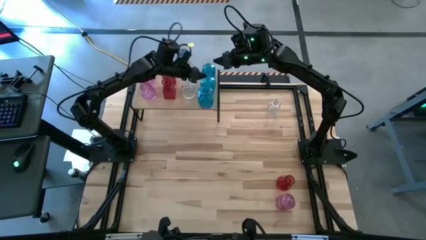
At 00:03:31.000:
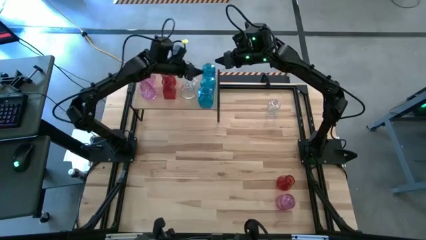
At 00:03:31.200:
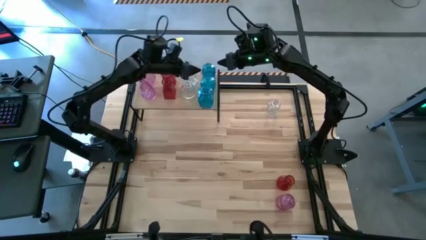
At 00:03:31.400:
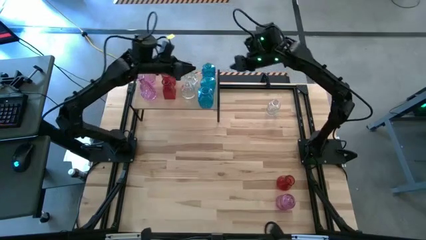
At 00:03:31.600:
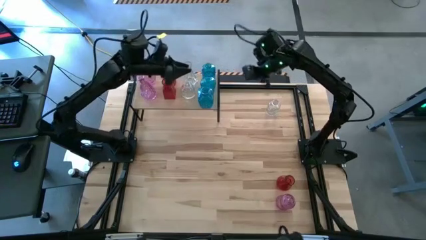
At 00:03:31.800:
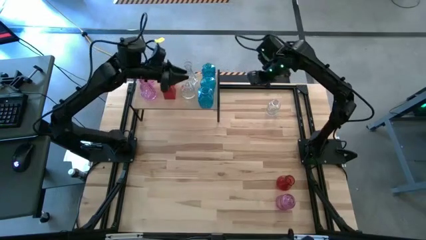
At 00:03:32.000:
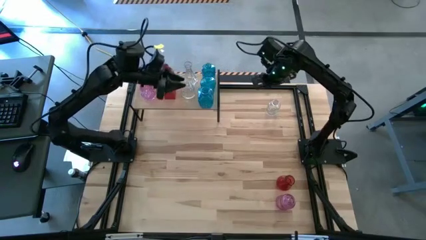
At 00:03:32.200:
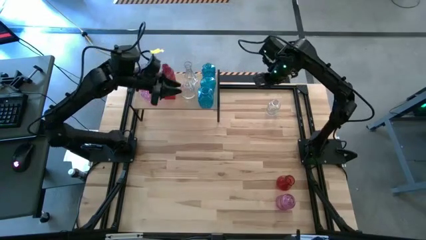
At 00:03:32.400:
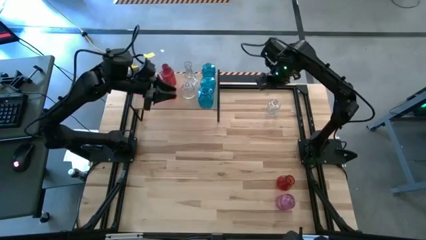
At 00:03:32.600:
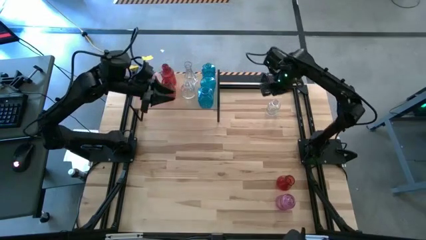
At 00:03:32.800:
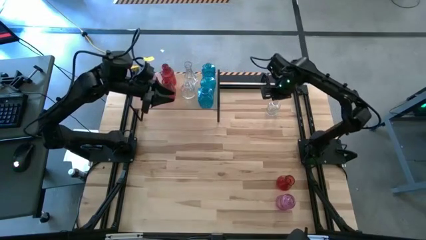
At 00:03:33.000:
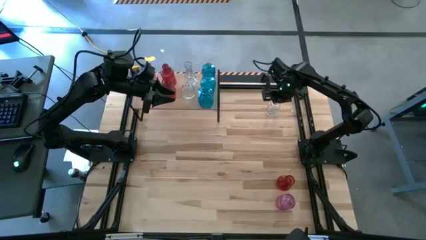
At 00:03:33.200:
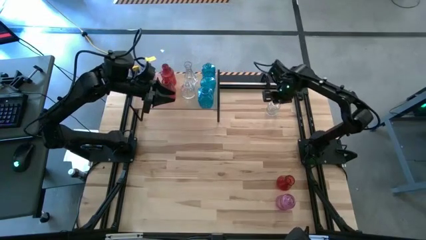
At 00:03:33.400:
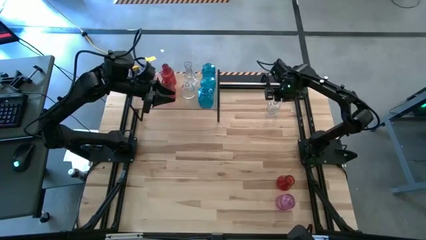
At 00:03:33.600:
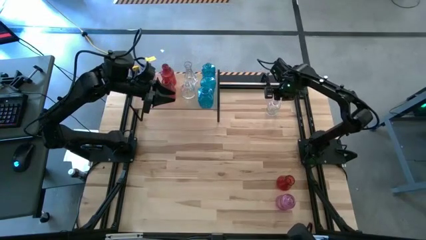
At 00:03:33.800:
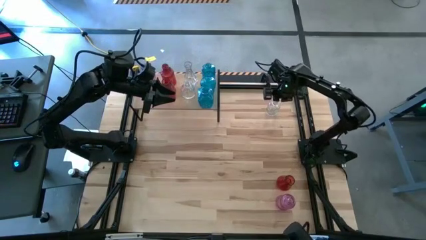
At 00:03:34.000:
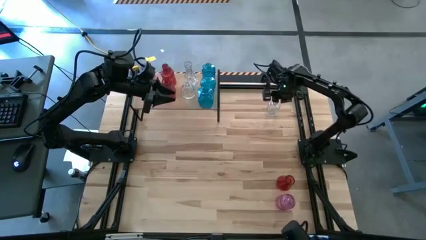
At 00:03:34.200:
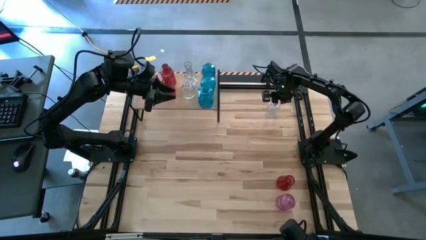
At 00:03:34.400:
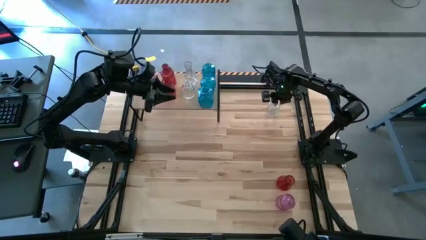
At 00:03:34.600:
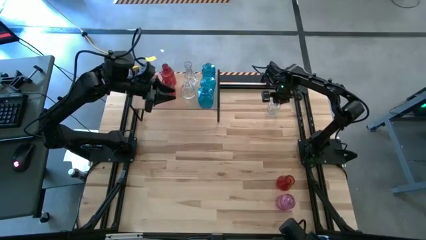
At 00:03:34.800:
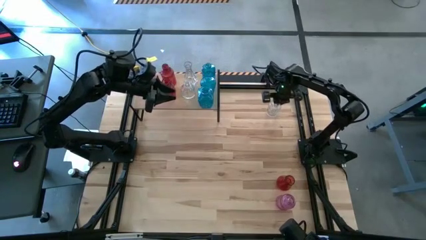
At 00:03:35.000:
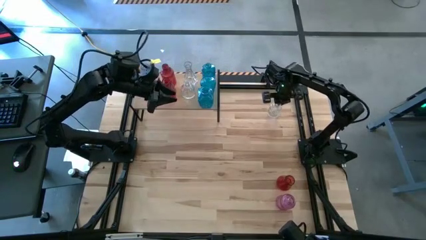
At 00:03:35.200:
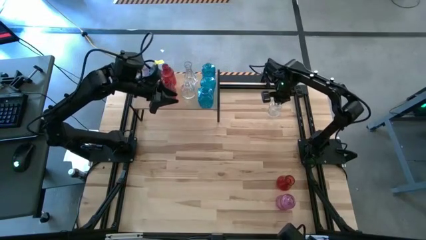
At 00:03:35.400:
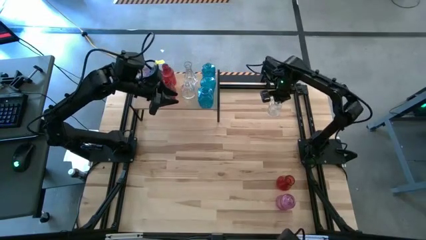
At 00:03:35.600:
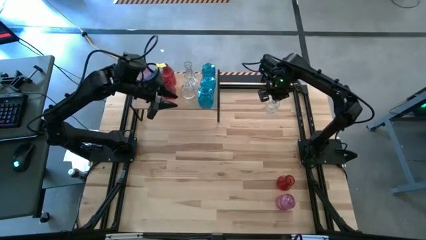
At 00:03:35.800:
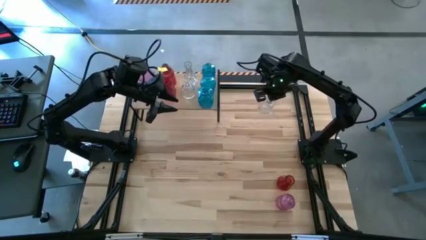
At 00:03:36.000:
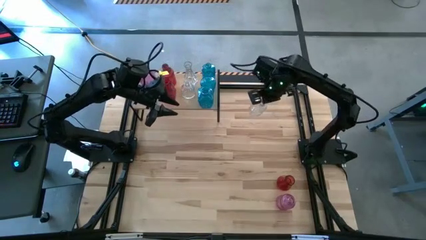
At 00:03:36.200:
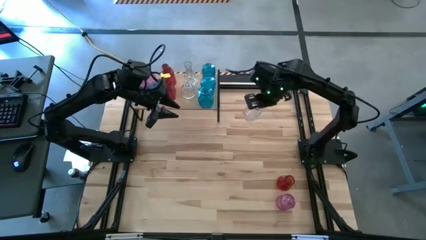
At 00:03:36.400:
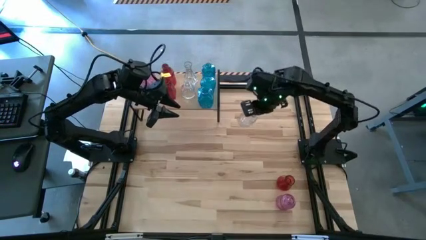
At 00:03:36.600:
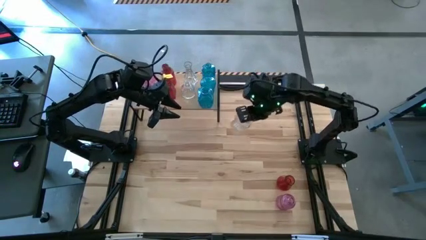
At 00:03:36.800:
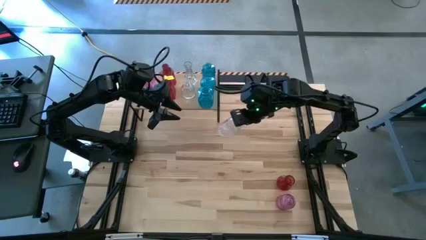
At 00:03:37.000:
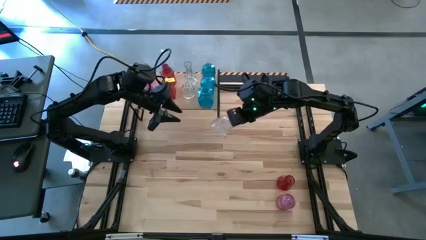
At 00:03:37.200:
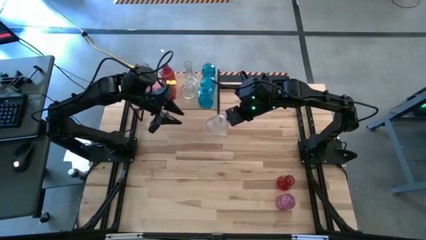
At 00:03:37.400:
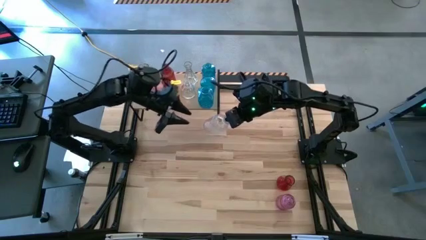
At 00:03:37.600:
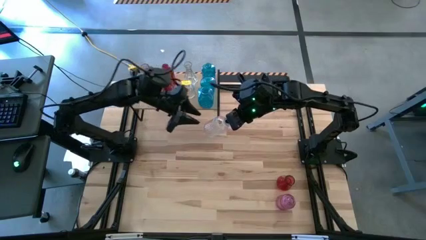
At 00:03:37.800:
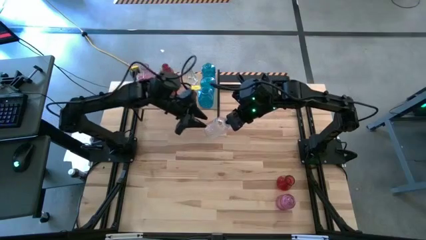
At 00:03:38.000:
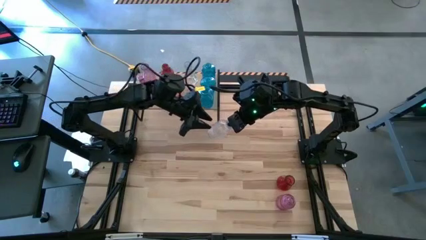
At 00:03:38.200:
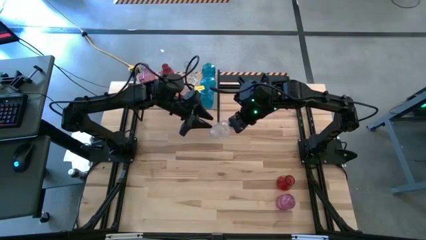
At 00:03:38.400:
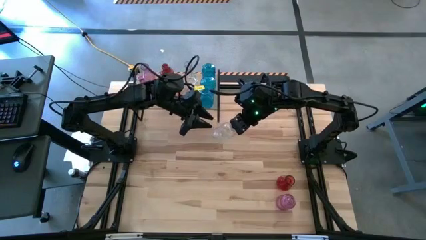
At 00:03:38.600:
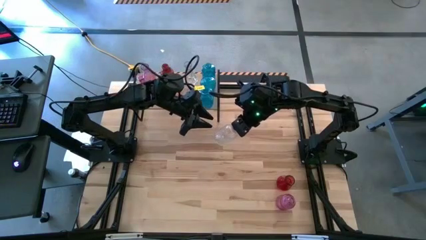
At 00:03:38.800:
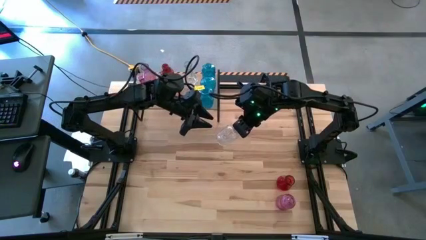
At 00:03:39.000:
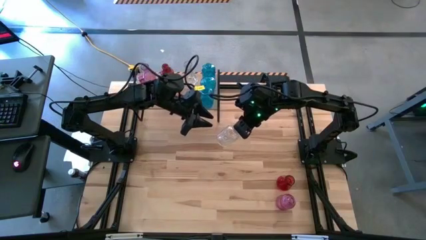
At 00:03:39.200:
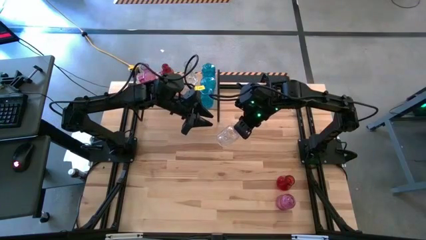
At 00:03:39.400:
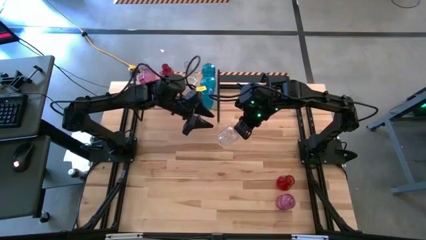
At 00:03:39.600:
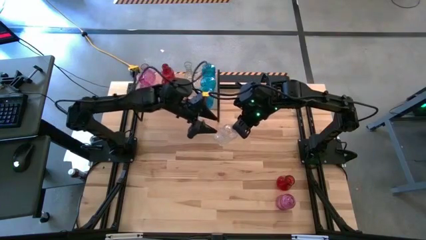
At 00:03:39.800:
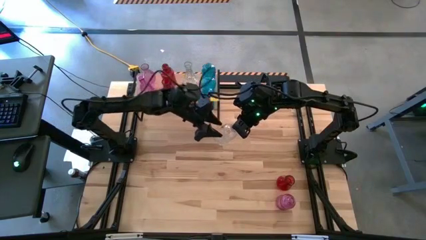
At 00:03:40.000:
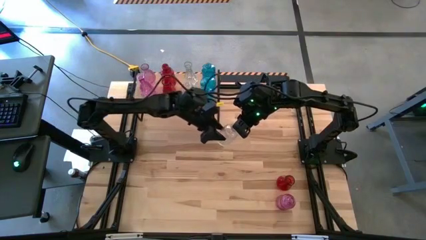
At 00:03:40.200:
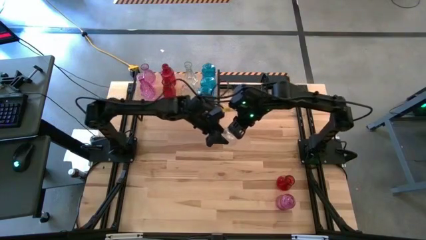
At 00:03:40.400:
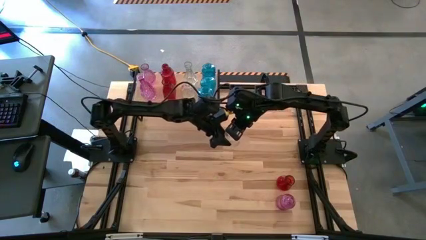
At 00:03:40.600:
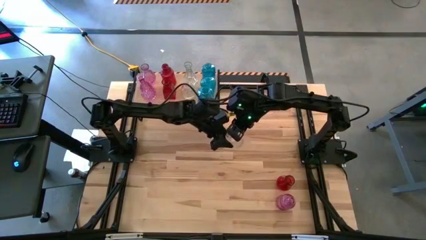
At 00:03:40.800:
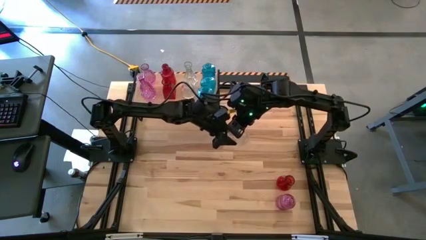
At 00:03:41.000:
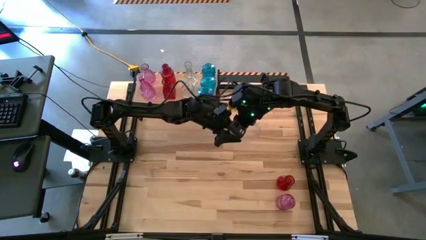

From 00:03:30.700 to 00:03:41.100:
Task: sort vases onto shelf
Put the transparent vase on the shelf aligned with the other transparent vases

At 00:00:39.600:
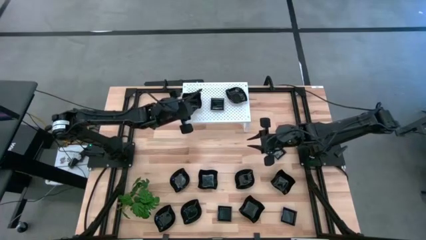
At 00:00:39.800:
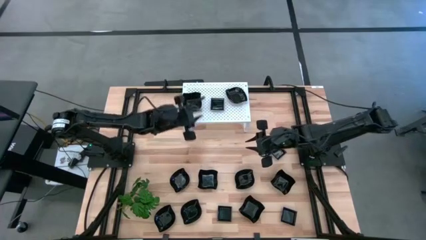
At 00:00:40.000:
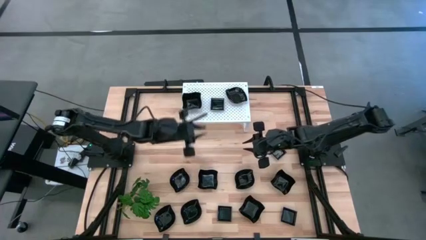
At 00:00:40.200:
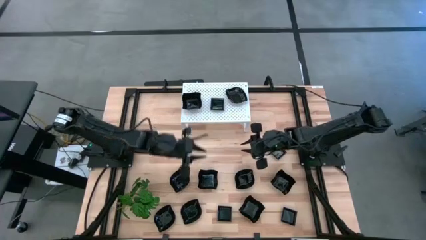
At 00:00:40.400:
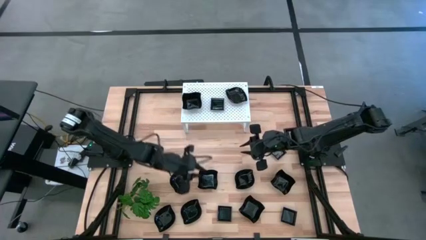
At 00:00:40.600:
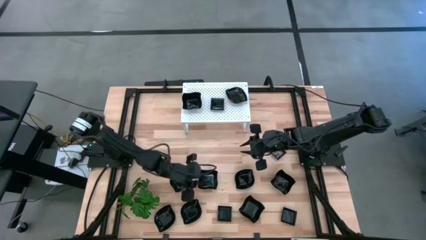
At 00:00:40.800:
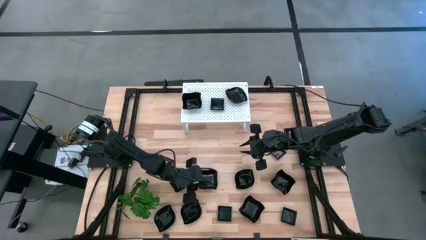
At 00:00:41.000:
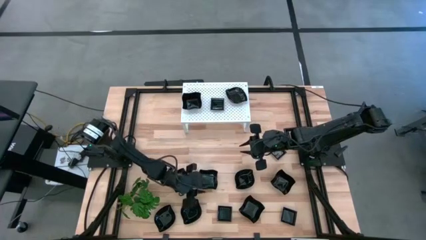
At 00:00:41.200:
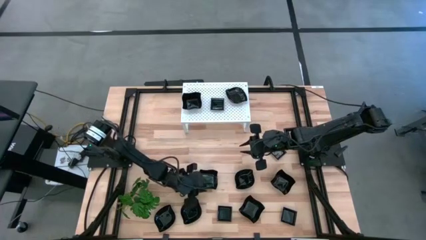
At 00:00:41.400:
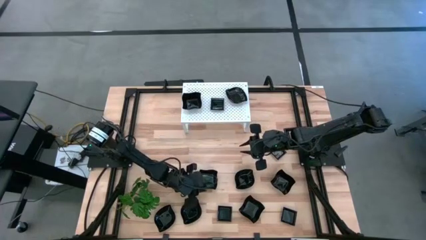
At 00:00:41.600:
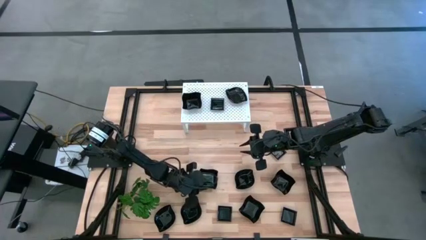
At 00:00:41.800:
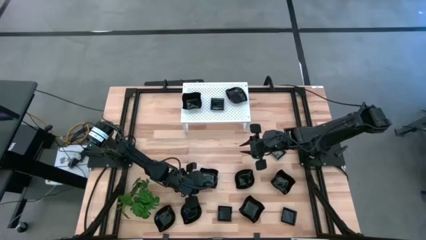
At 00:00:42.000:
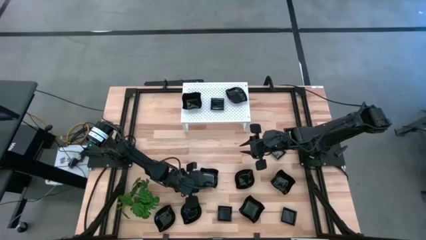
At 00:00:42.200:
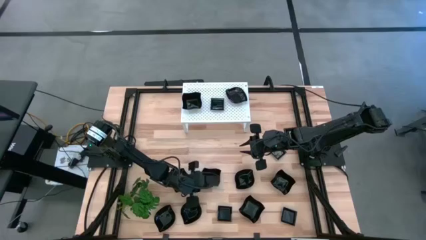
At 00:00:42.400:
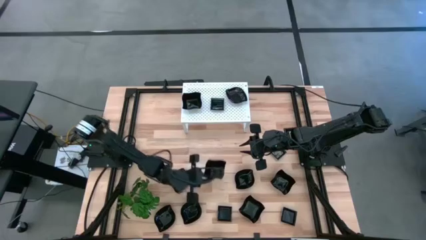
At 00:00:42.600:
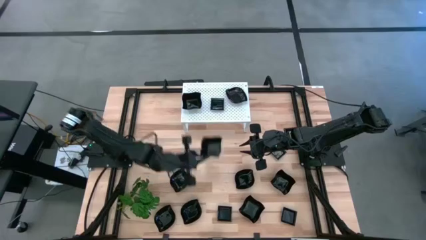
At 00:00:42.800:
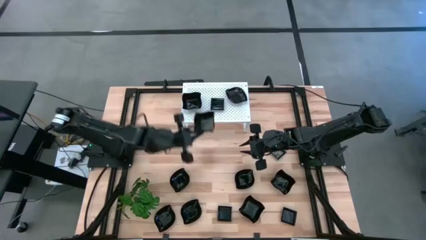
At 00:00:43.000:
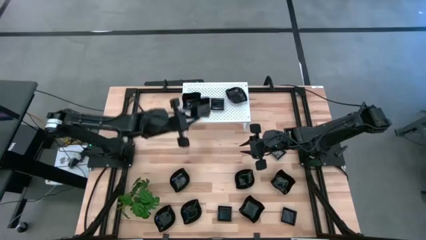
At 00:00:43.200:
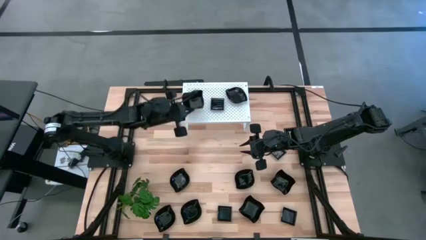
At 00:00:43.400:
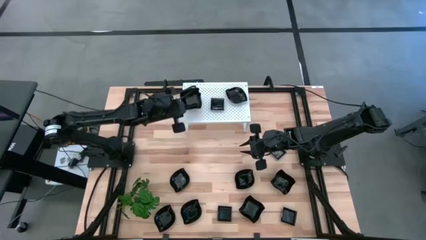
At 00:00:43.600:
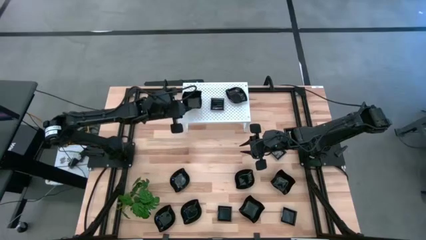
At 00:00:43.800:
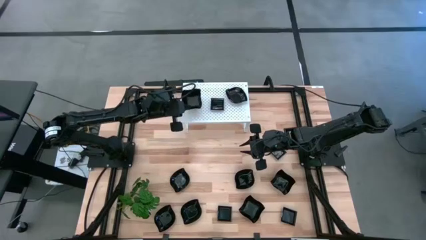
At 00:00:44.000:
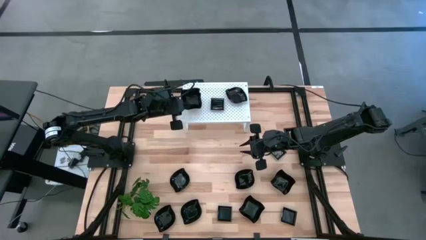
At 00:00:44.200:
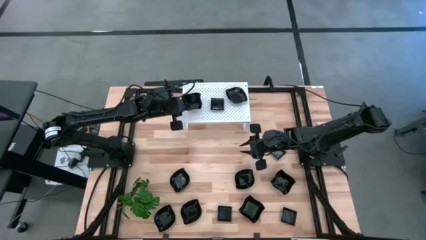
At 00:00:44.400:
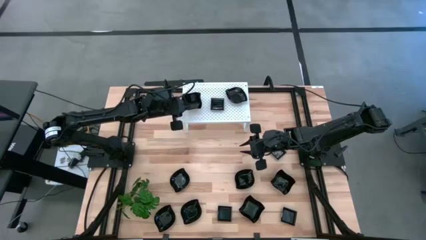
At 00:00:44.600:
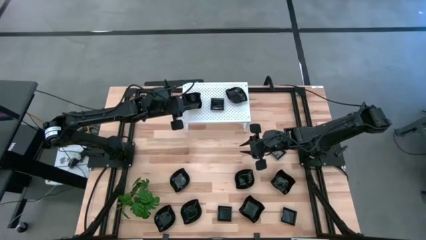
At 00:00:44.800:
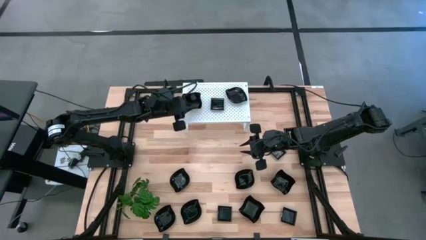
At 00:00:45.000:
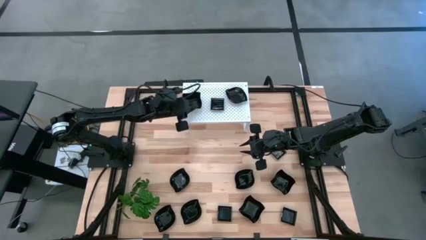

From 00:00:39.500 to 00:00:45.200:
Task: Pick & Place Mini shaped plates
Stack the distorted square plate on top of the other distorted square plates on the shelf
